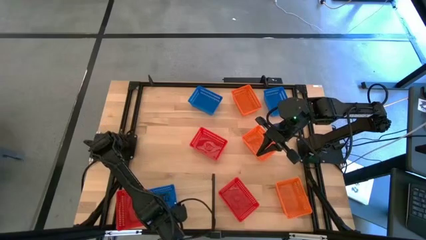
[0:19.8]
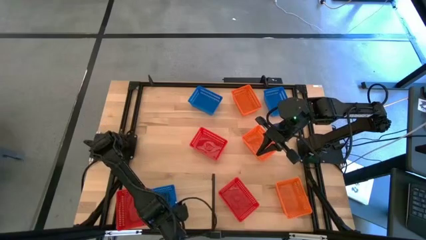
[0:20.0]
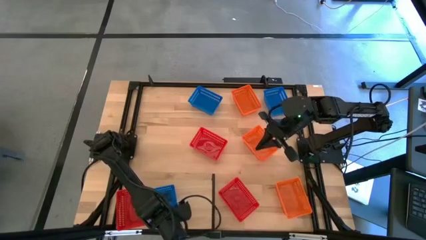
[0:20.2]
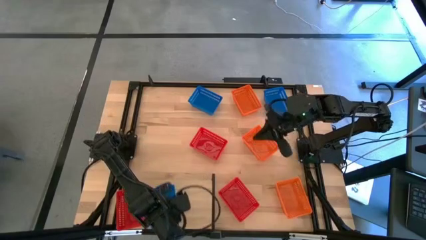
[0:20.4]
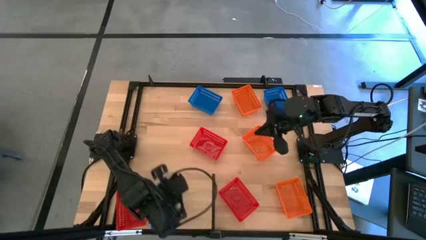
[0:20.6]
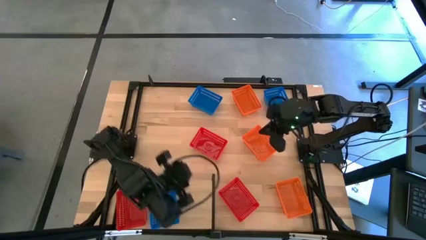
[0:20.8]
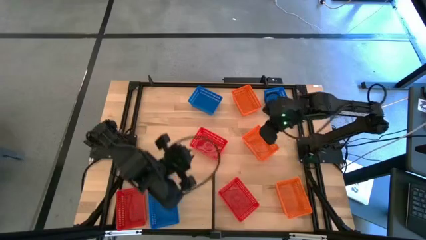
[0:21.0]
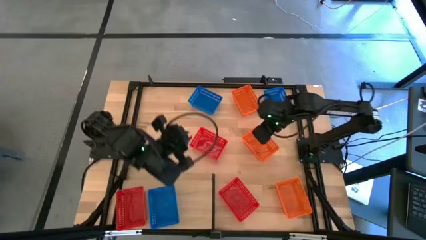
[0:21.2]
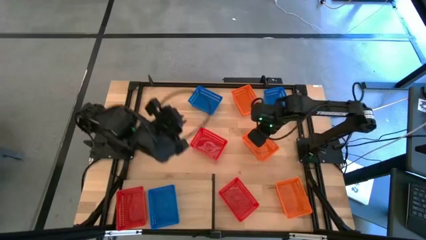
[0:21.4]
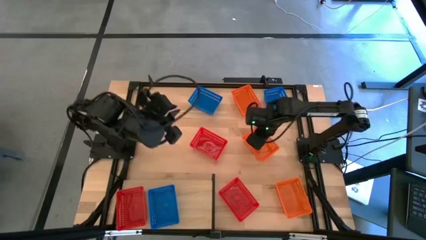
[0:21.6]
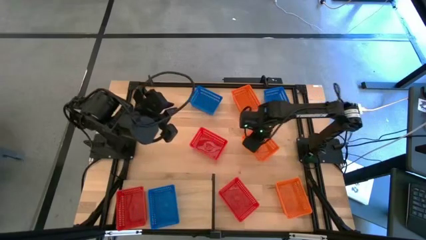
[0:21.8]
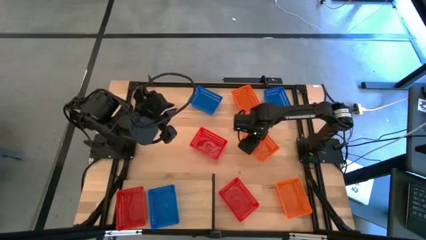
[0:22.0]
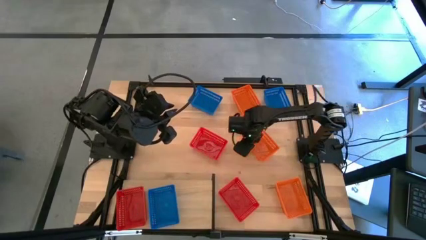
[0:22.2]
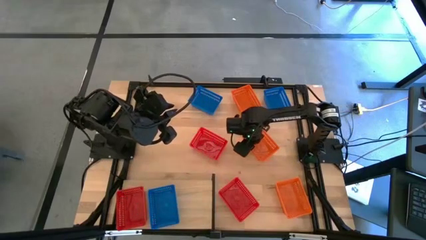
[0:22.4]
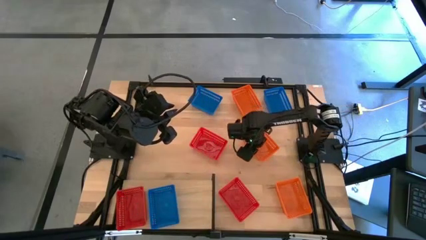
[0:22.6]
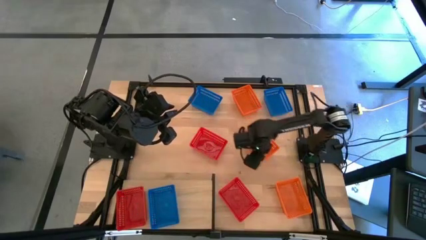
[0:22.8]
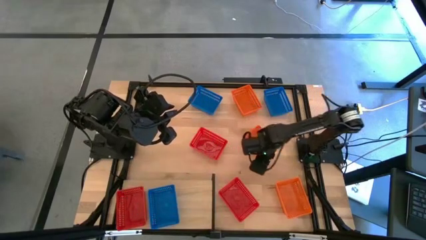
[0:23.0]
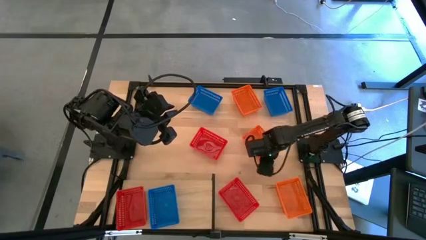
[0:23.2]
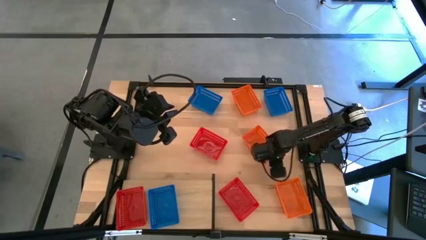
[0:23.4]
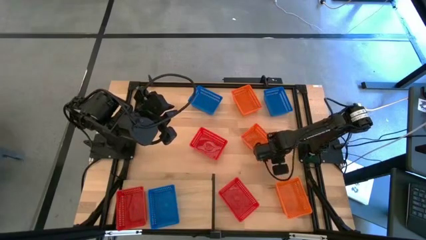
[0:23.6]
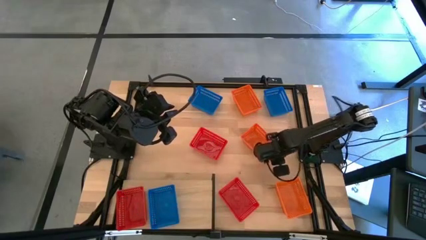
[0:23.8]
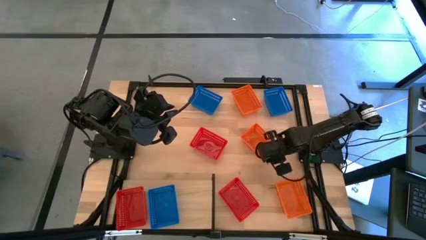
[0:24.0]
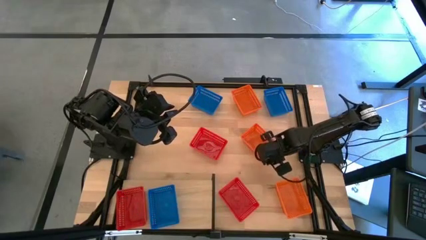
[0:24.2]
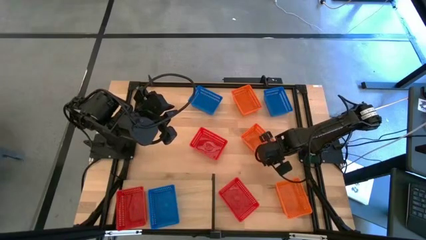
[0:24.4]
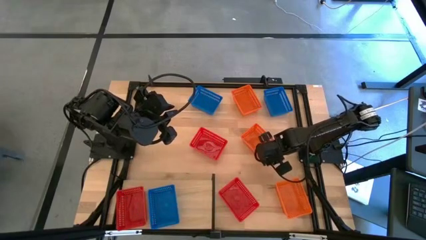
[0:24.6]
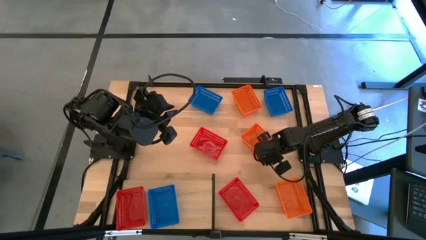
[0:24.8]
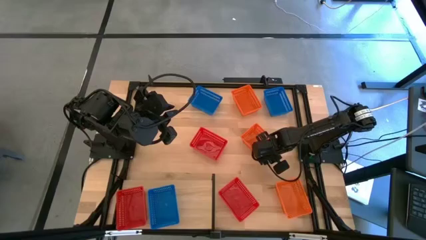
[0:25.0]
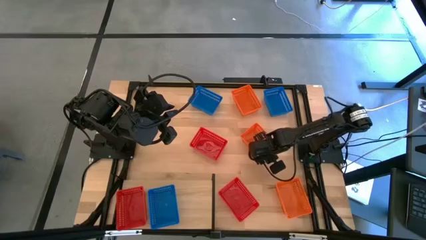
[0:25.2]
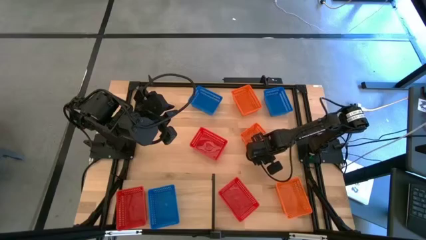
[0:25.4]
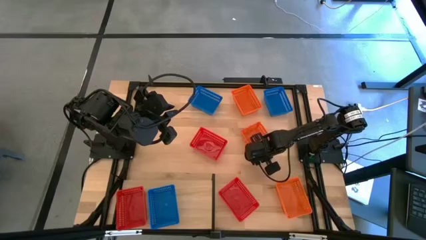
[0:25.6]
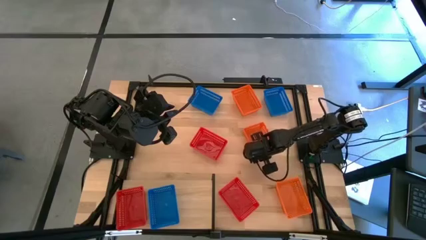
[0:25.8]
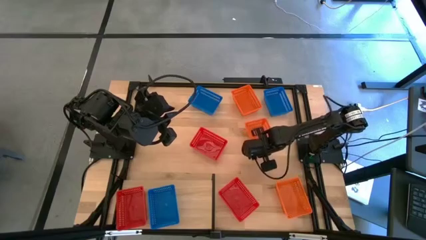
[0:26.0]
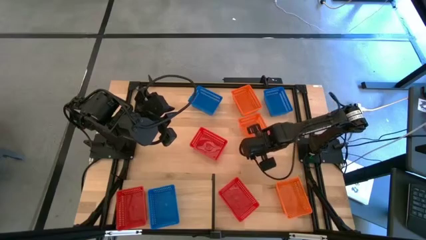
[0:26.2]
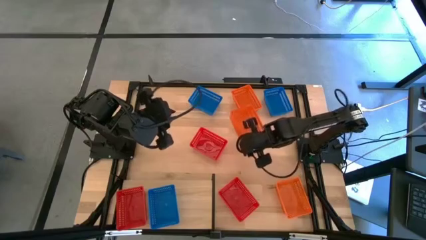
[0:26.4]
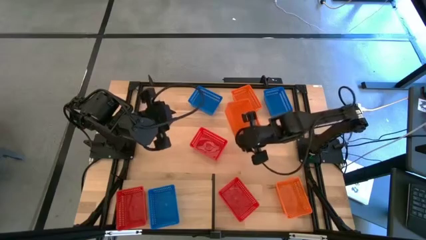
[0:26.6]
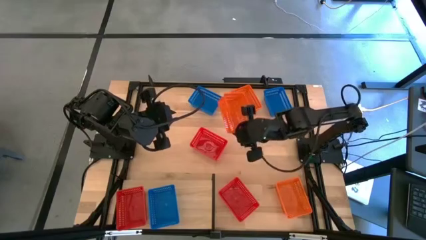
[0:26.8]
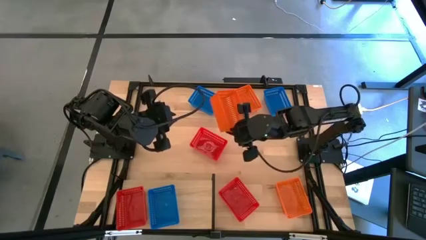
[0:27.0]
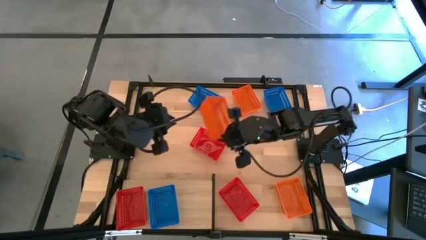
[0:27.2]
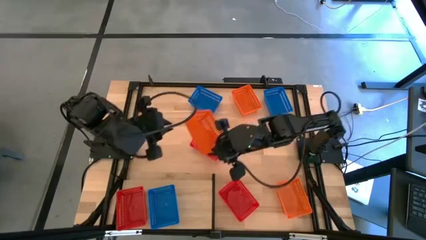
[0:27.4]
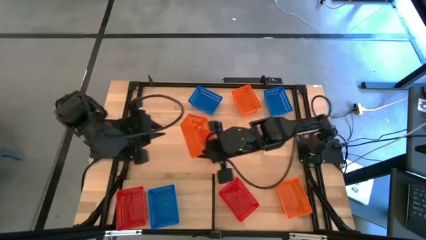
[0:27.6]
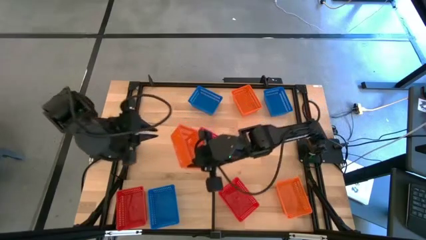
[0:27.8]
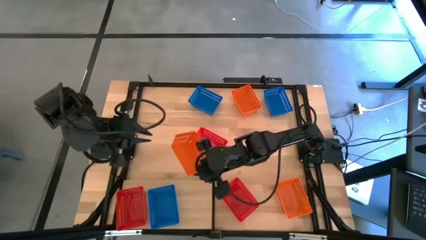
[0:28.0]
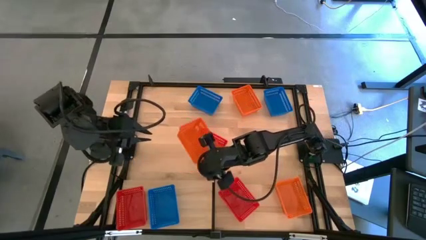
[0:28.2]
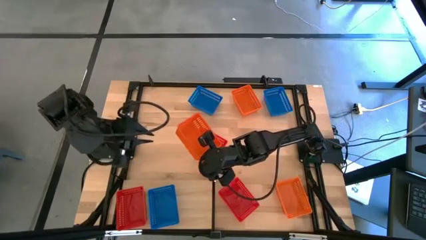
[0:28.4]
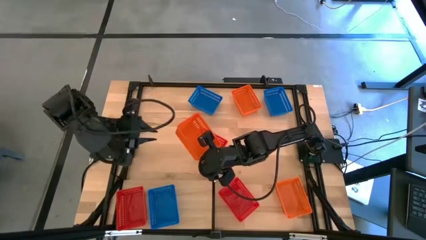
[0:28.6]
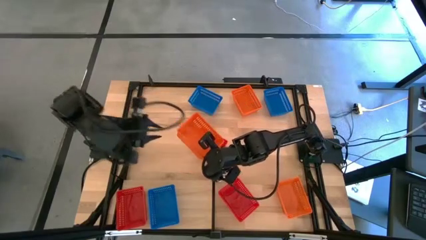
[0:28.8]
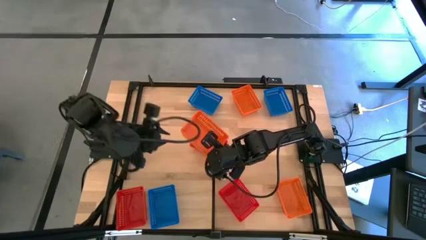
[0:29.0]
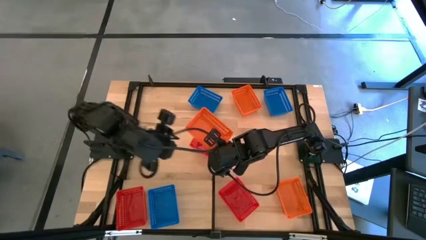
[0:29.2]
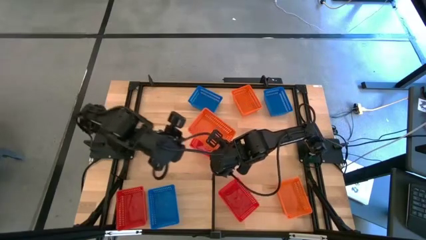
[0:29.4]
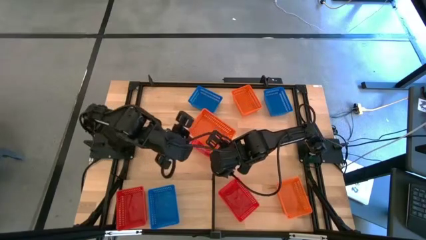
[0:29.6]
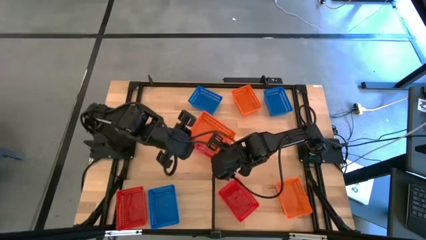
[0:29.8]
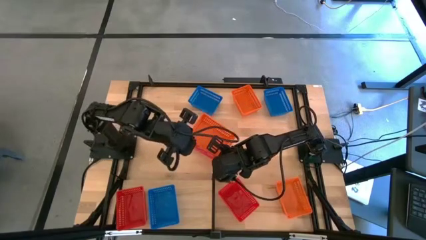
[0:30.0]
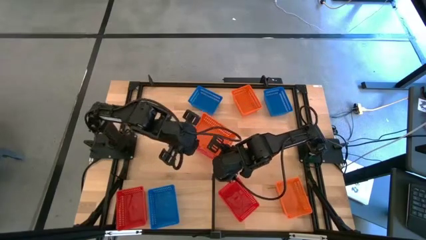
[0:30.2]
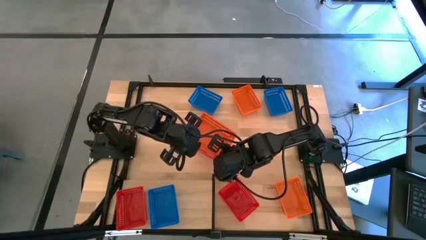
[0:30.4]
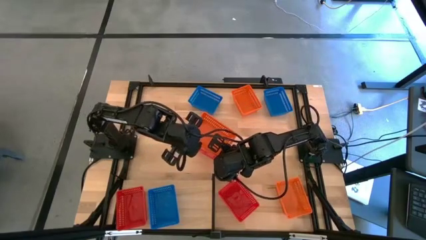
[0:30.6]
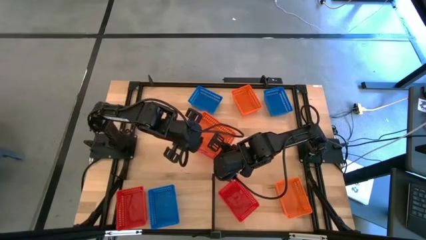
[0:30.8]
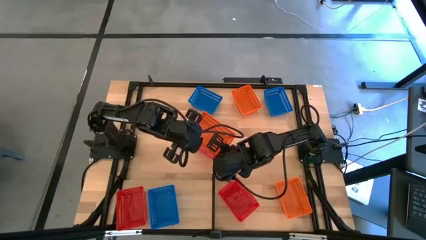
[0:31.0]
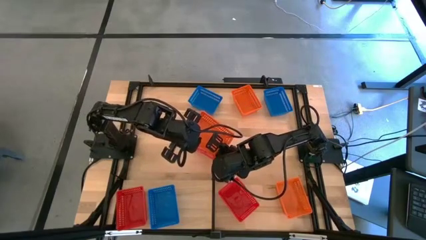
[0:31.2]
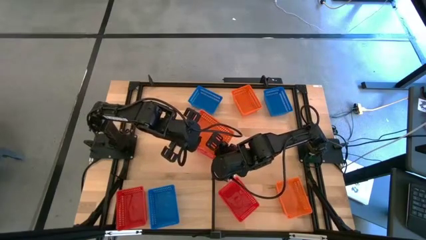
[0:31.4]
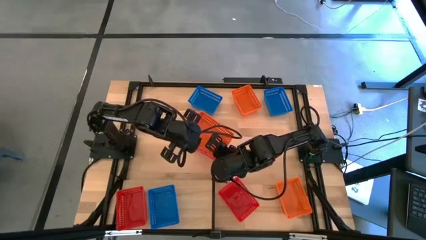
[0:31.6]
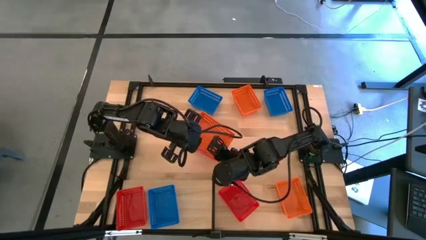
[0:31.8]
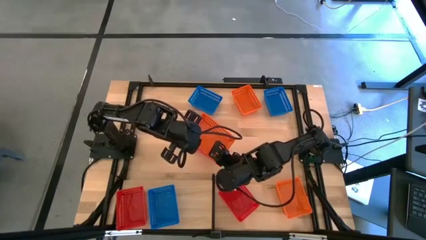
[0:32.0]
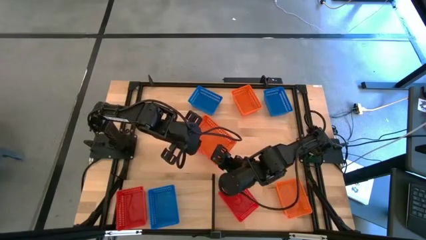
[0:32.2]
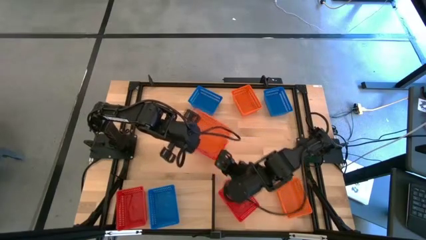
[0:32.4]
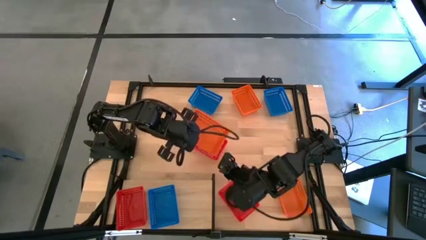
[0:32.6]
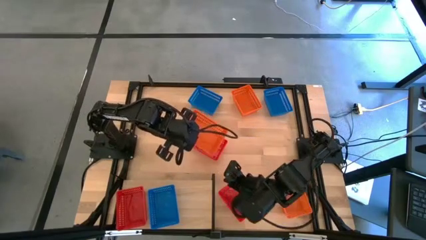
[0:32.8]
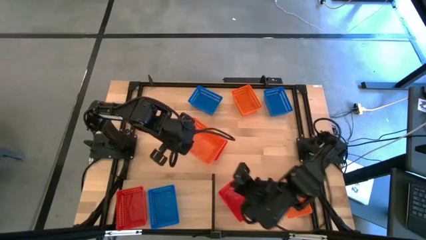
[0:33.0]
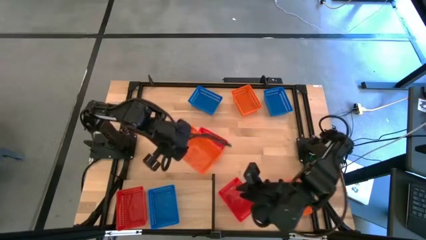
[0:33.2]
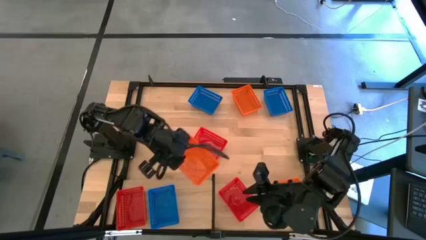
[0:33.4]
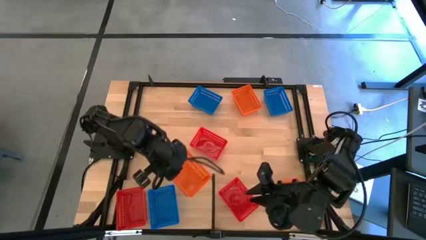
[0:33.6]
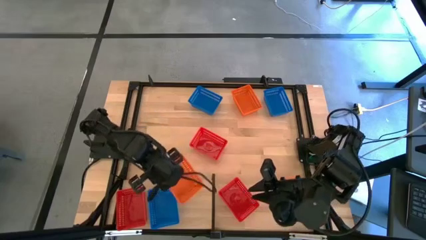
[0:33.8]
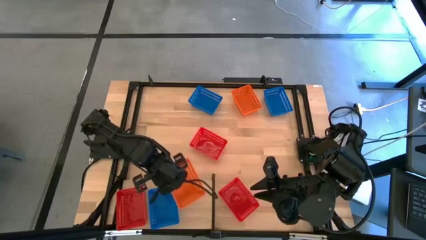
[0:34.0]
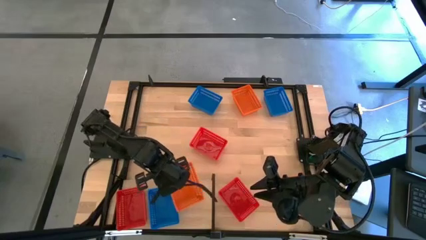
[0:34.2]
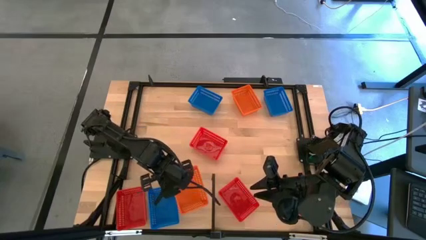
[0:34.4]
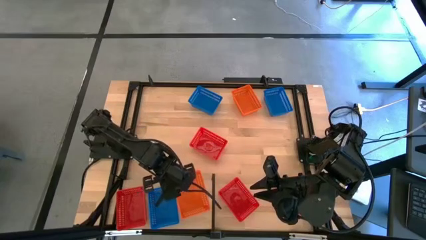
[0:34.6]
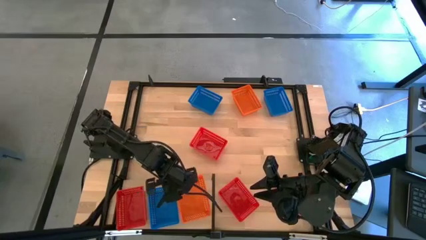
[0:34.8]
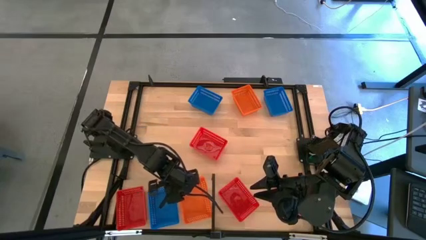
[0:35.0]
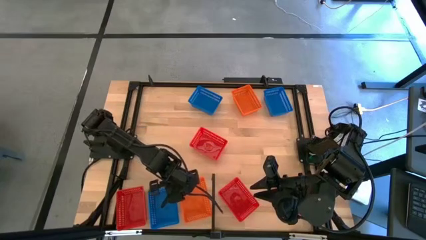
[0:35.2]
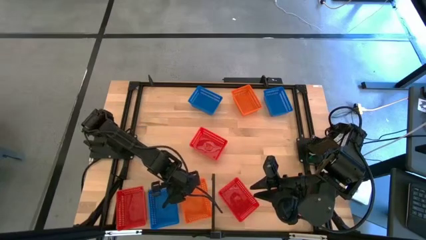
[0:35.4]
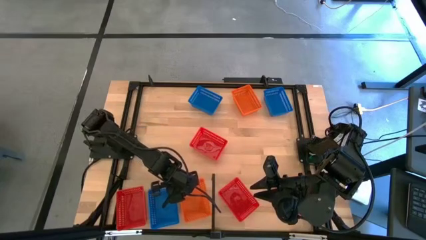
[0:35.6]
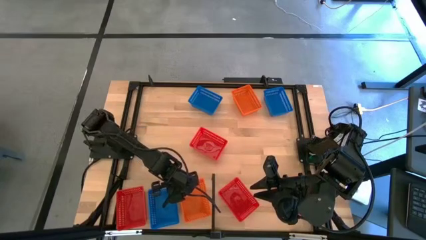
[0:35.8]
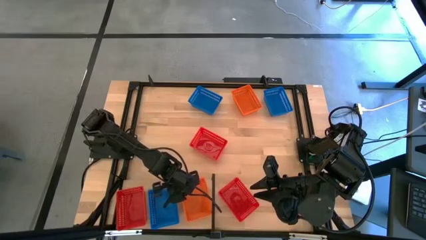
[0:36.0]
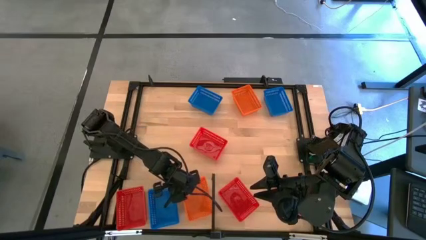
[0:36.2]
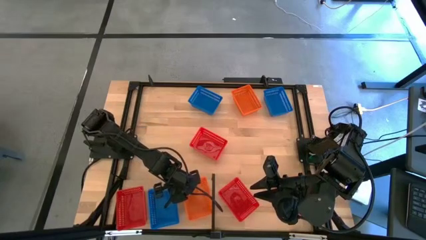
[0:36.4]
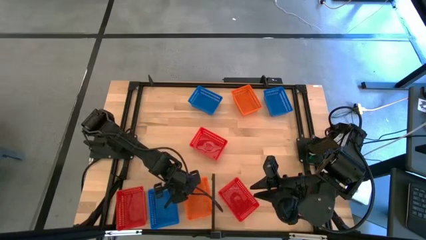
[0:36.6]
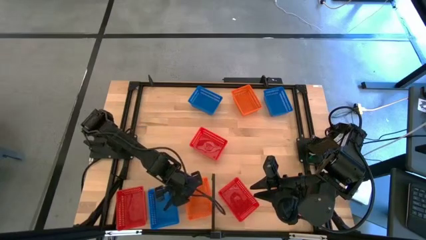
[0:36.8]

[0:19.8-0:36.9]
Task: Stack baskets on shelf by color
Put the middle orange bin on the shelf
